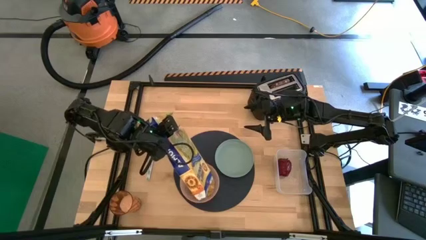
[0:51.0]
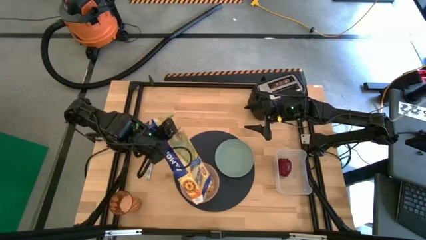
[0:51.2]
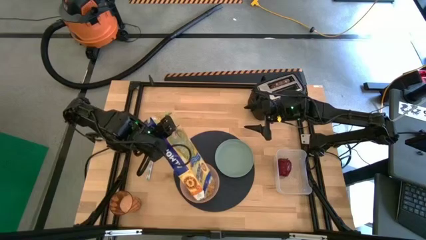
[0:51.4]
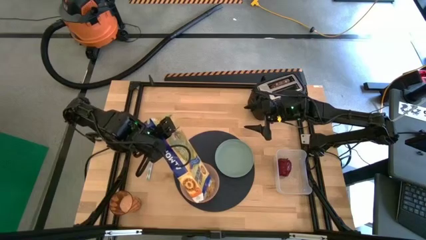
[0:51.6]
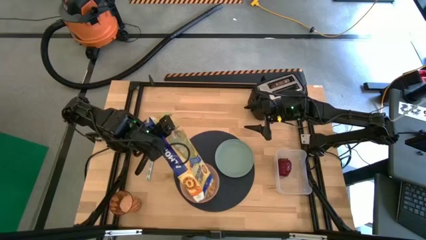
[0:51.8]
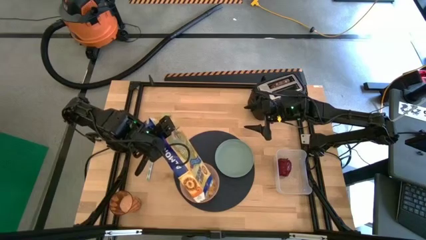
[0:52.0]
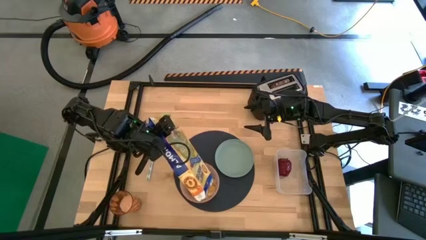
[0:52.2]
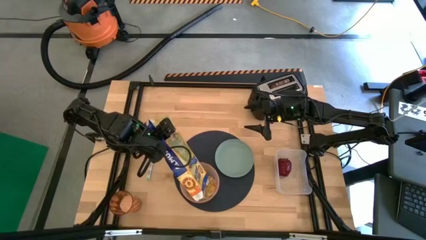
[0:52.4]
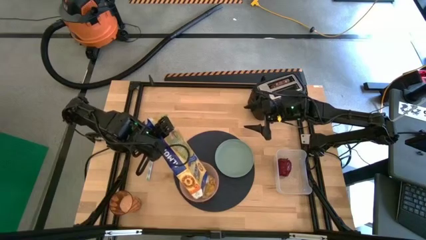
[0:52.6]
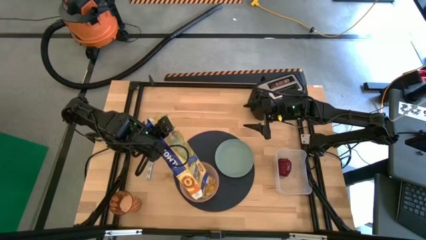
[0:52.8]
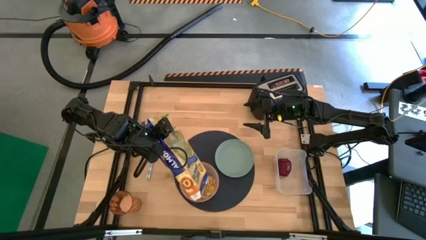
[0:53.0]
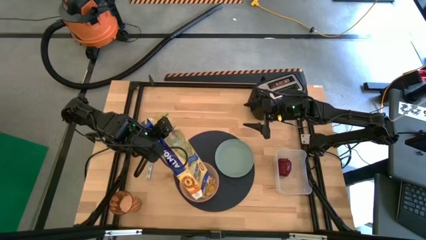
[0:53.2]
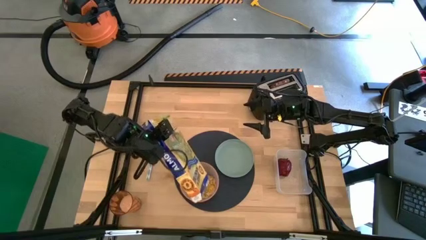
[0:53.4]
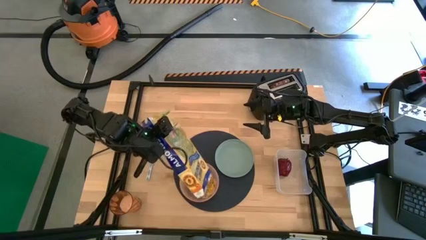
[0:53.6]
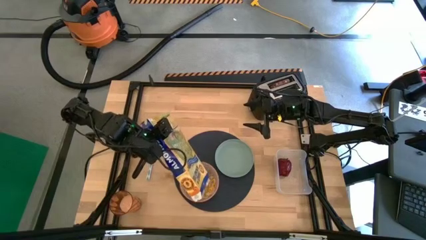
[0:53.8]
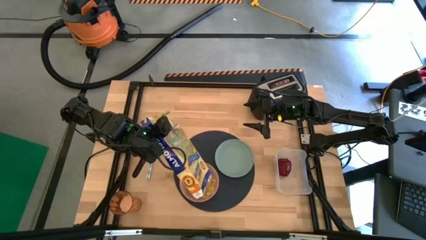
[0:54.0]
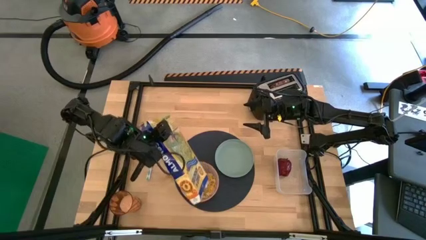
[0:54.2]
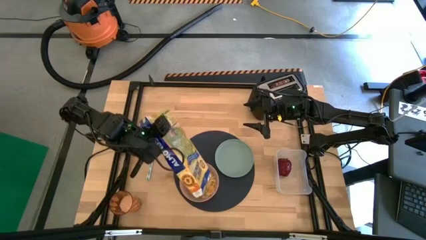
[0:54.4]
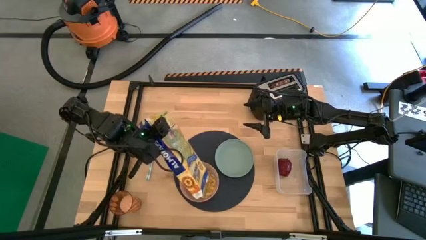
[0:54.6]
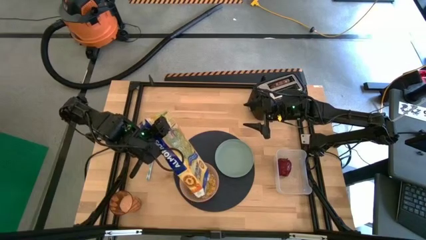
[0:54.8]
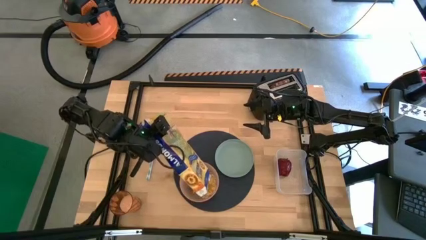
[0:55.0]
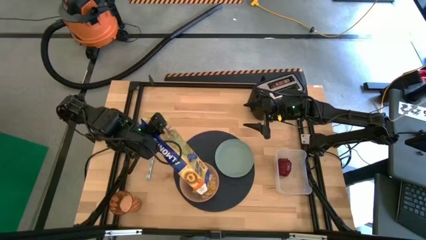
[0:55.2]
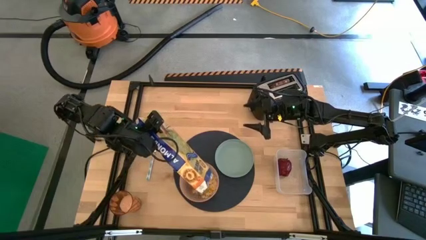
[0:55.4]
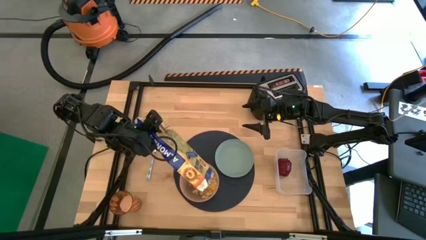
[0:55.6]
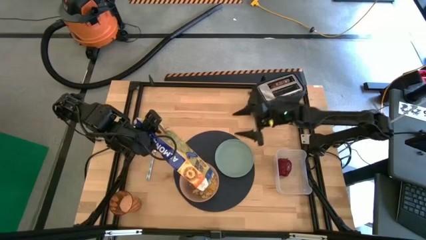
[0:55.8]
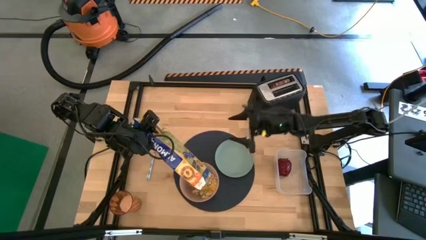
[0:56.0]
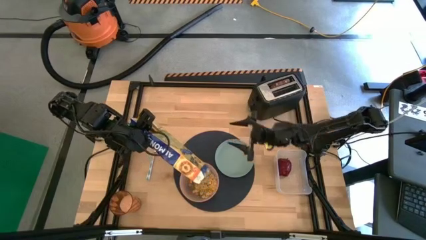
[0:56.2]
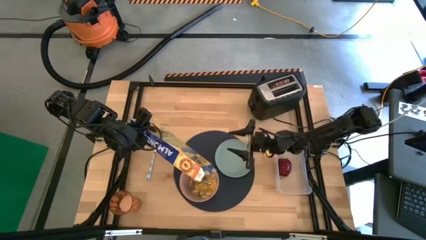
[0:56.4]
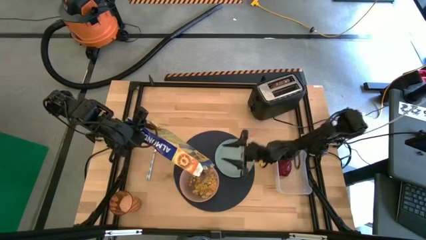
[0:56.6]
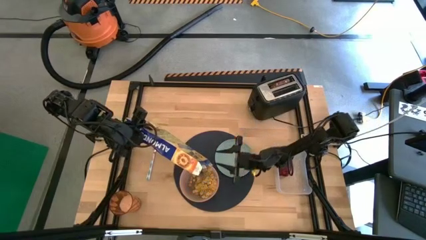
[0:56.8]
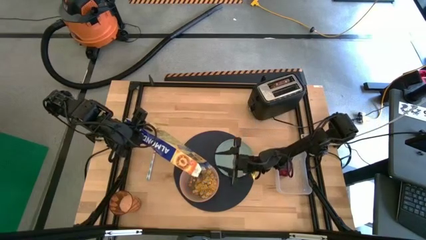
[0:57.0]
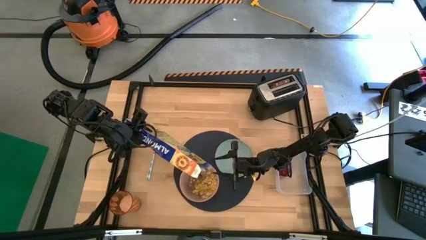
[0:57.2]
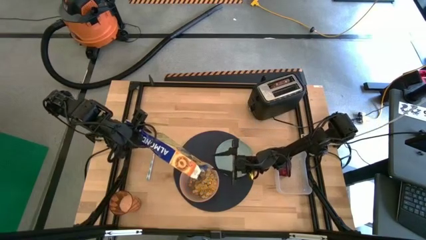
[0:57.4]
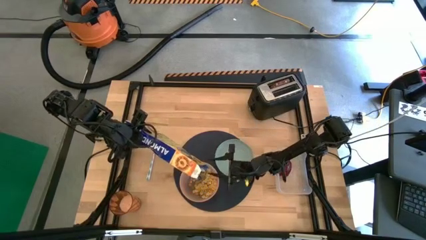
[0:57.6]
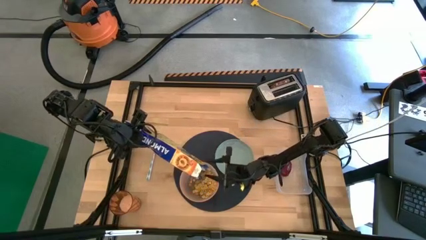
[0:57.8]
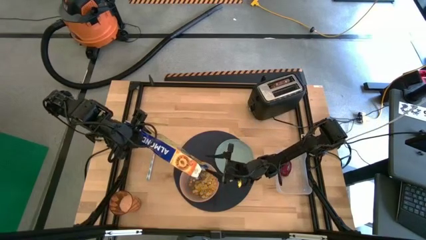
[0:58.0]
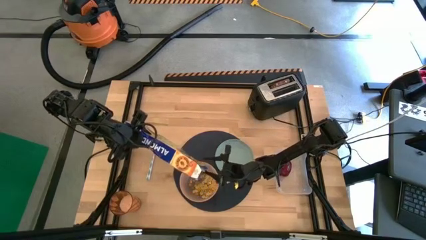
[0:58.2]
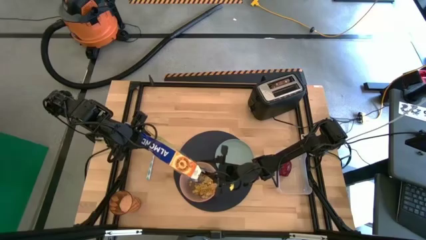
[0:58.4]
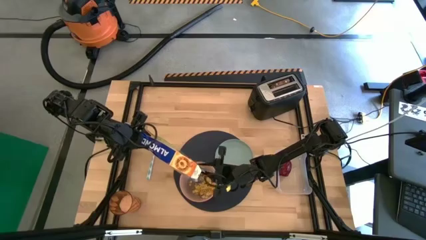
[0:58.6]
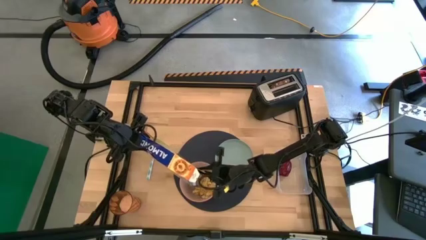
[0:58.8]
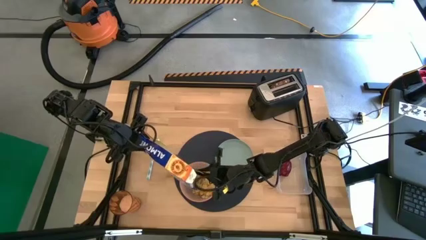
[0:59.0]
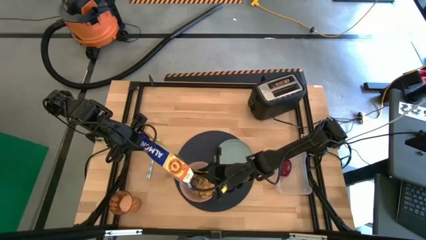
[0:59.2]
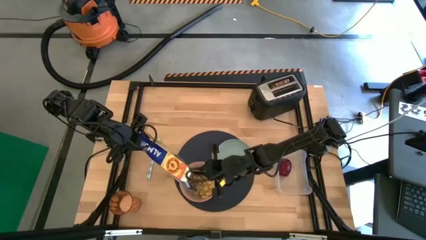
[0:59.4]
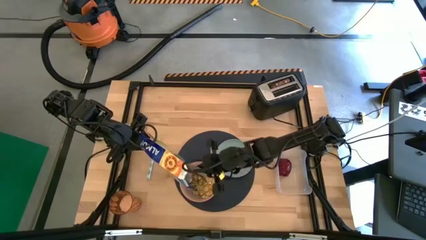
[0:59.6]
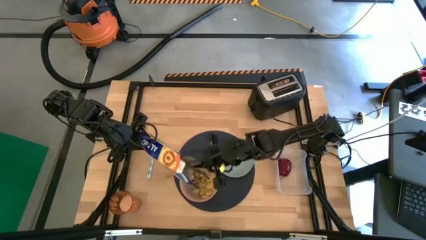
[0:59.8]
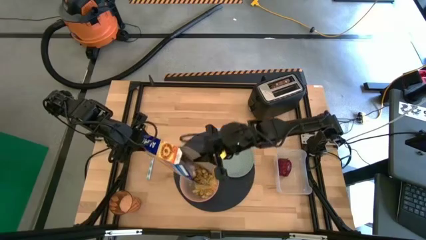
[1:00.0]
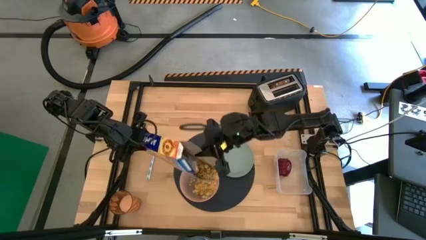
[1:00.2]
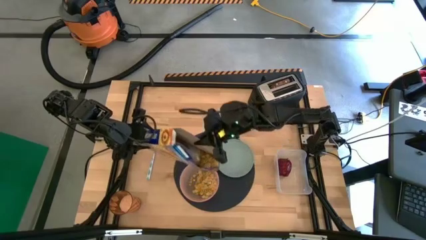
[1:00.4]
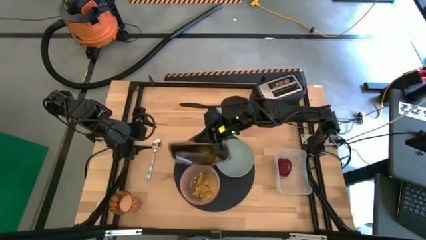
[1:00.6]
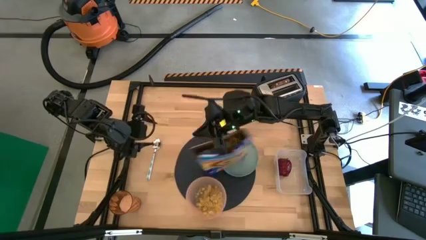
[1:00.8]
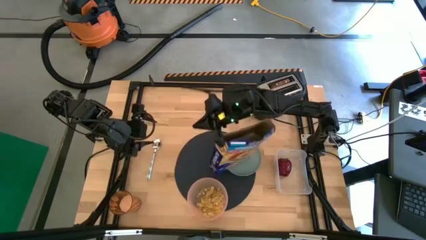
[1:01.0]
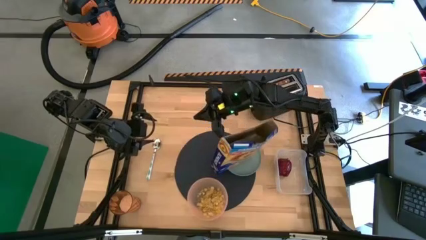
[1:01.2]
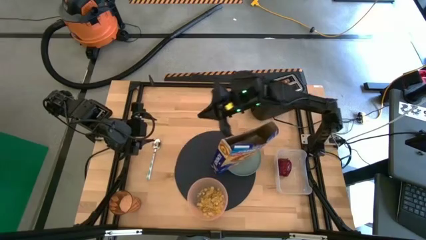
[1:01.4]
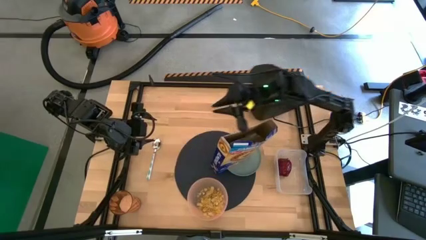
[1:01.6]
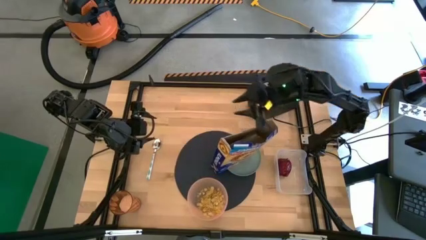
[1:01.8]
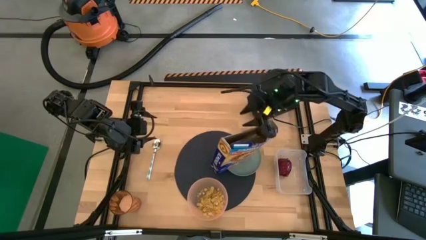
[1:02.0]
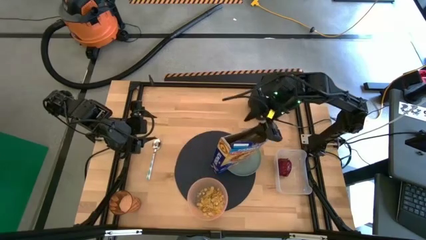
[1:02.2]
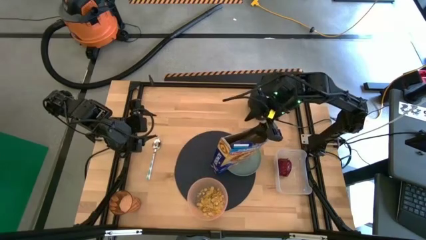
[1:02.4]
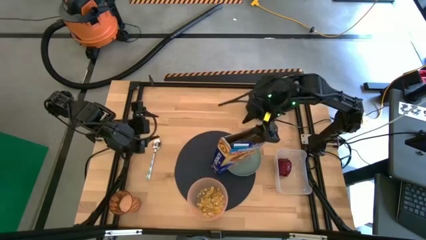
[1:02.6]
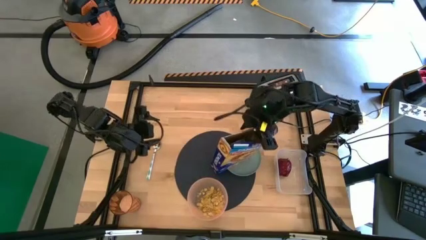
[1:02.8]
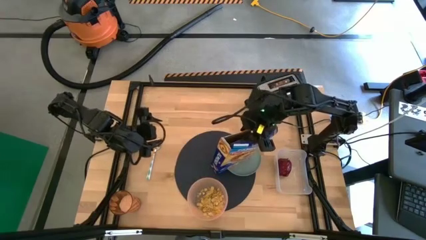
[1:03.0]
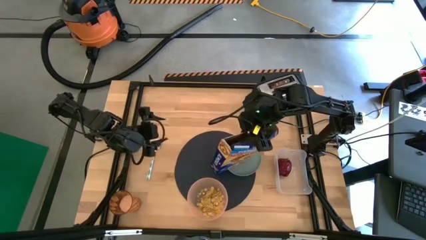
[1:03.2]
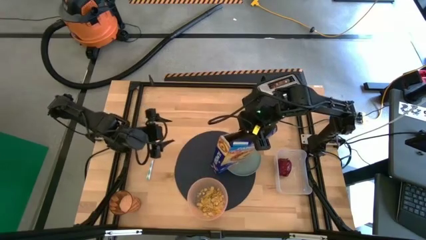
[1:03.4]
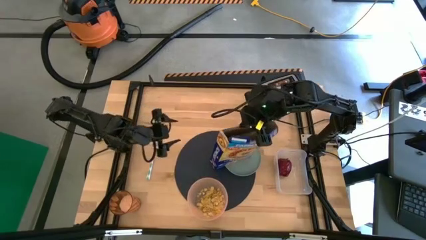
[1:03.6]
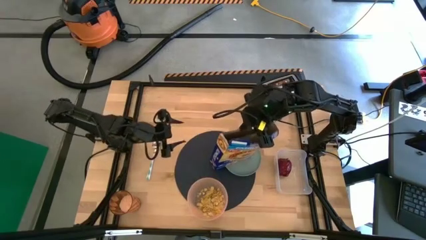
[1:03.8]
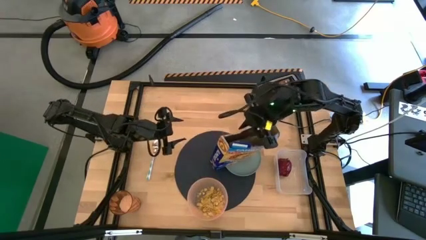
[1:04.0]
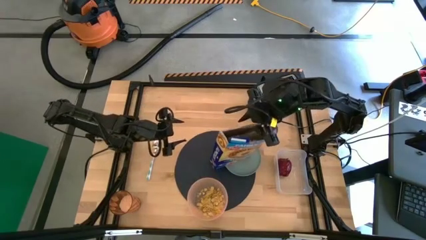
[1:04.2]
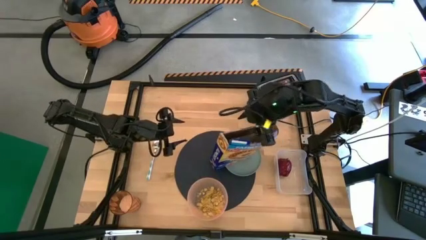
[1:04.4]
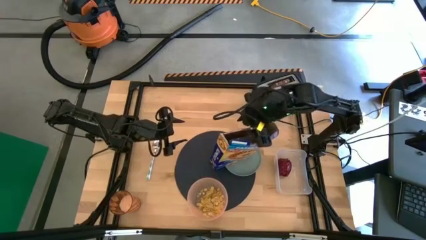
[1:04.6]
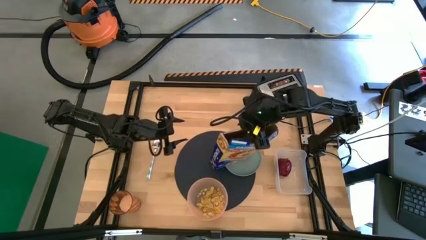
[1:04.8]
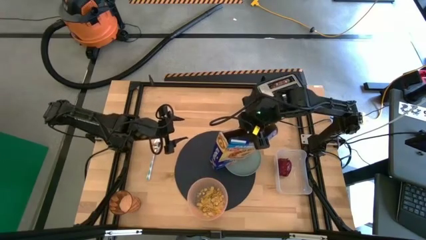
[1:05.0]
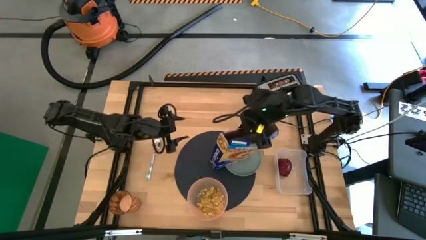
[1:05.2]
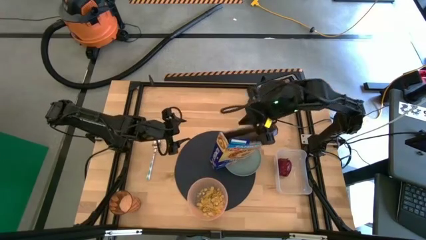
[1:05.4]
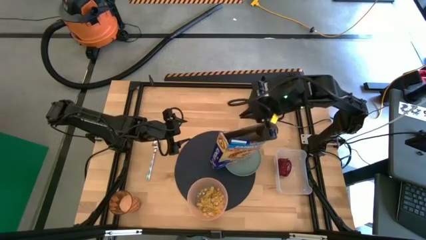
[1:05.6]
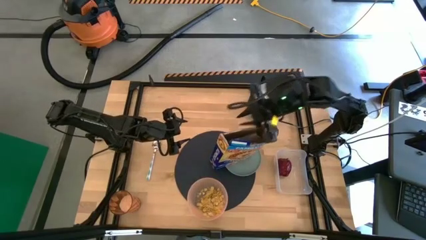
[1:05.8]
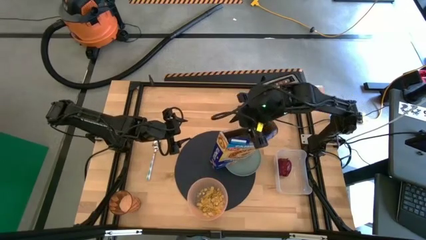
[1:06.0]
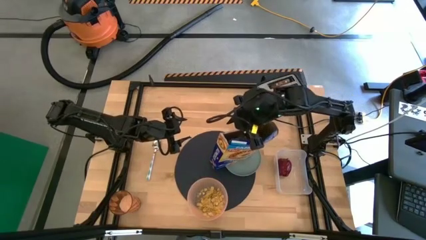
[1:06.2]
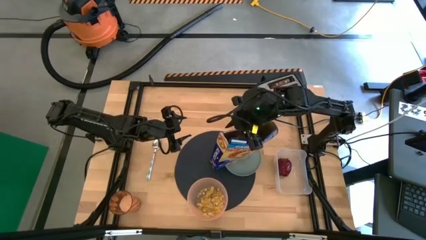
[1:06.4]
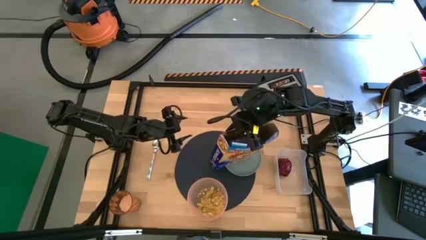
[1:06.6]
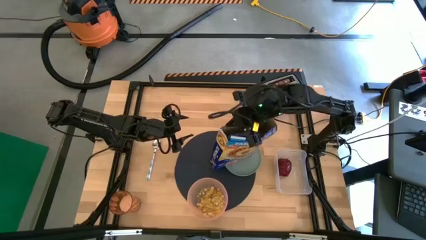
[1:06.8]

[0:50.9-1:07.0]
Task: Arrange a breakfast setting
Pour the cereal from the yellow cereal box into the pink bowl
